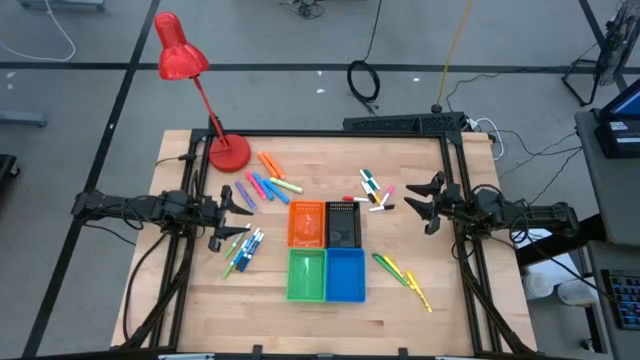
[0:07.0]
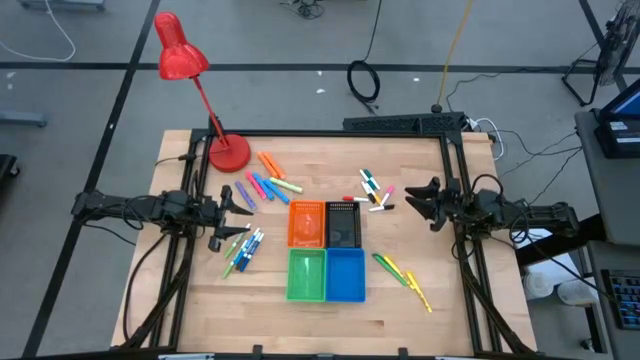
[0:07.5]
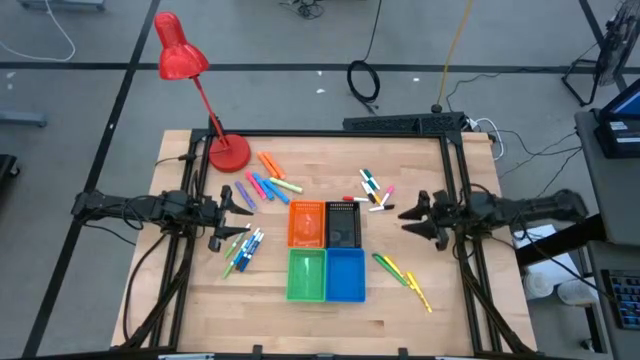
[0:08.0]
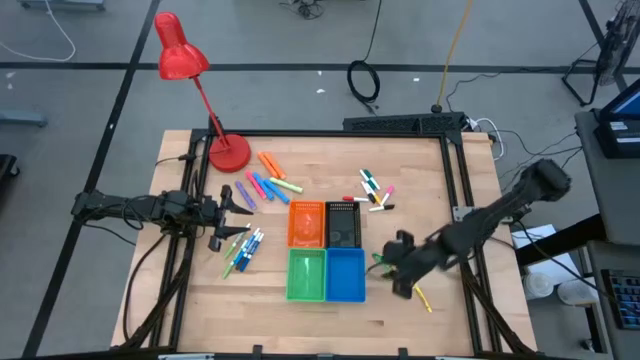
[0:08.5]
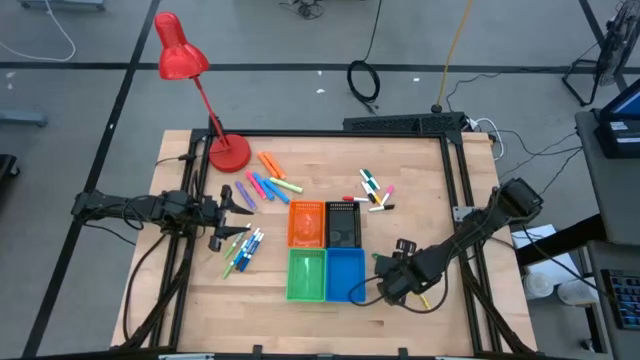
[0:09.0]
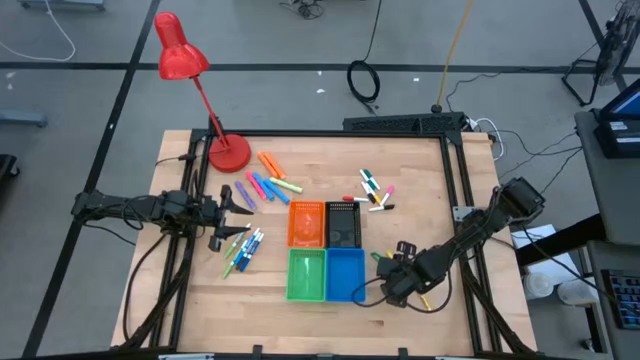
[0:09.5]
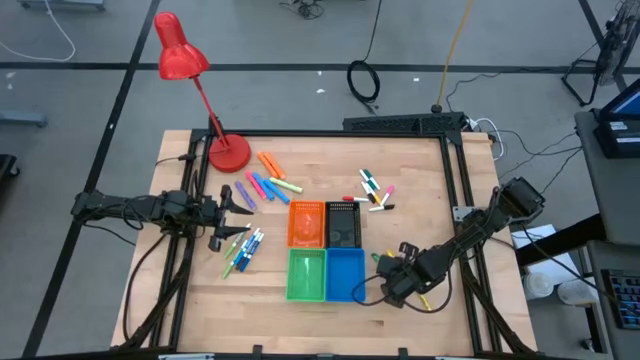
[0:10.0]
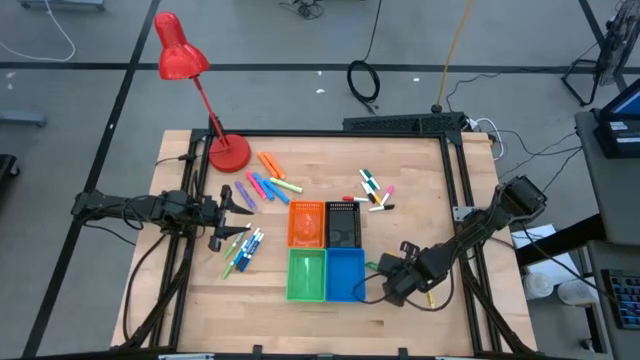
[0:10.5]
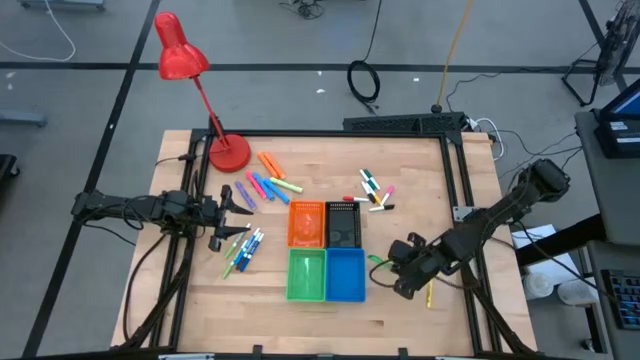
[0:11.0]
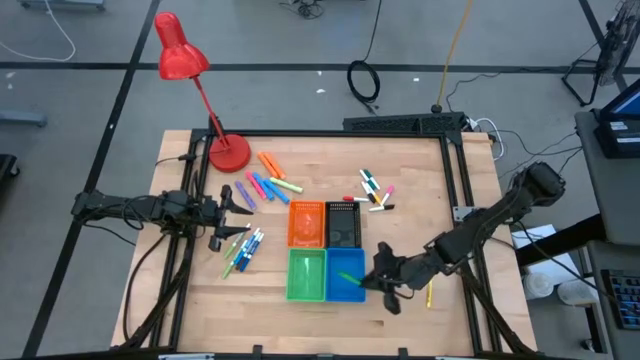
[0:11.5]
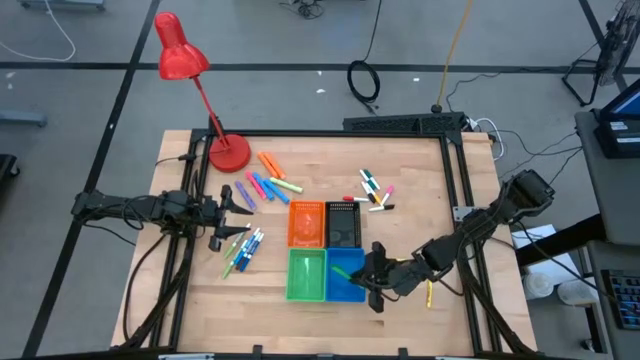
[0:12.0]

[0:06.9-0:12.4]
Task: Pick & Place Markers
Put the green pen into the blue basket

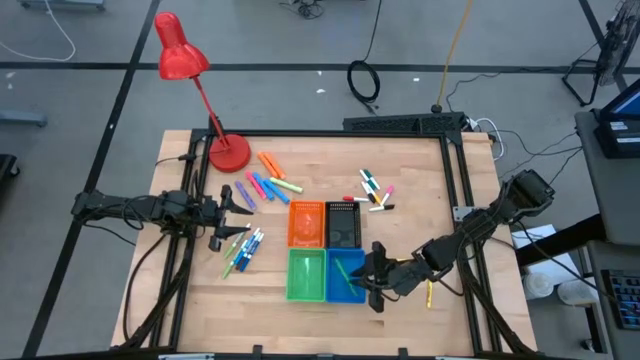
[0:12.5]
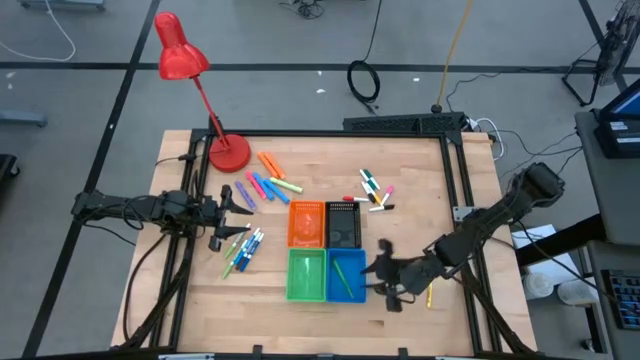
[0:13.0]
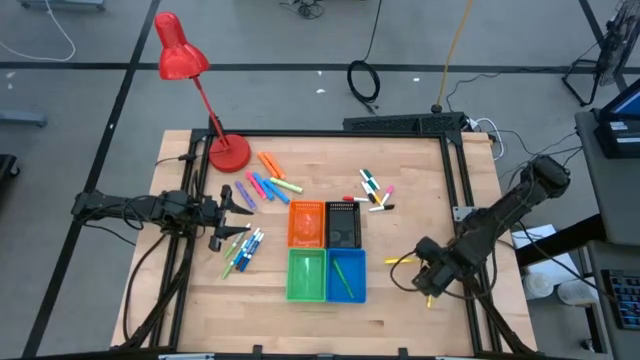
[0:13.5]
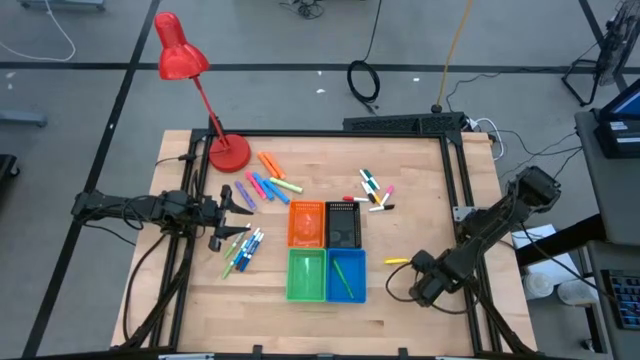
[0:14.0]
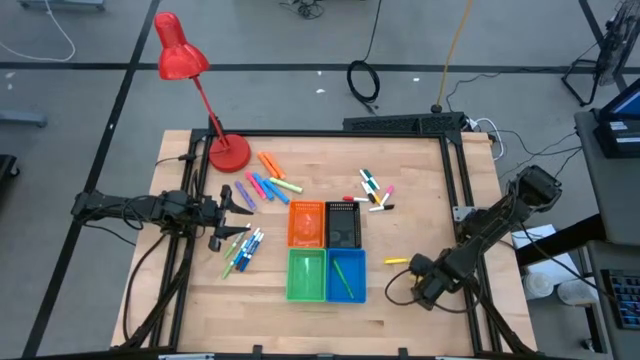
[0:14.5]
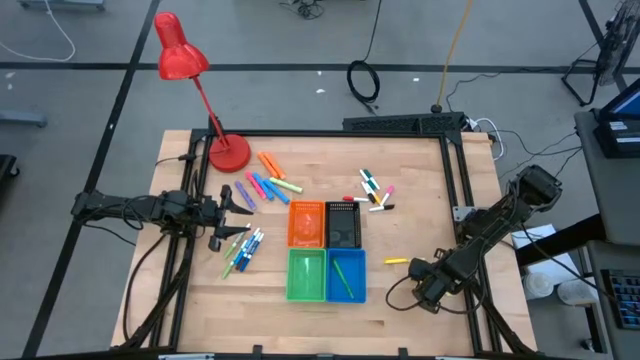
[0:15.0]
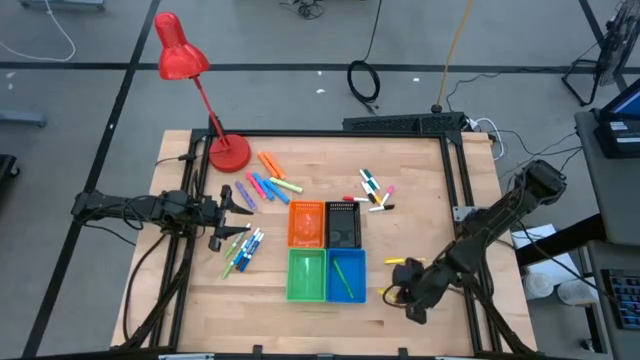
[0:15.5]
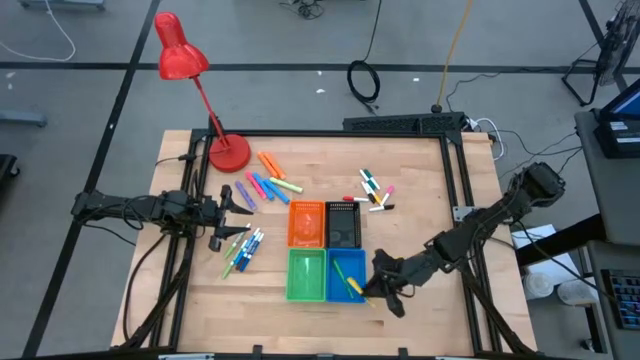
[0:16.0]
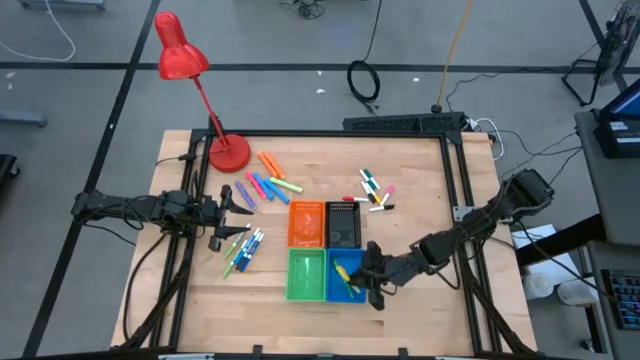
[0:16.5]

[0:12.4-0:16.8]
Put the bottom yellow pen into the blue basket

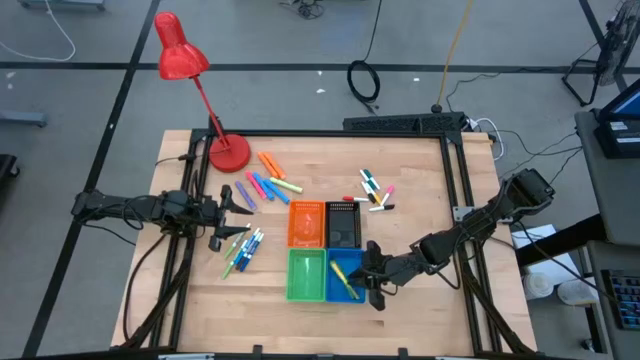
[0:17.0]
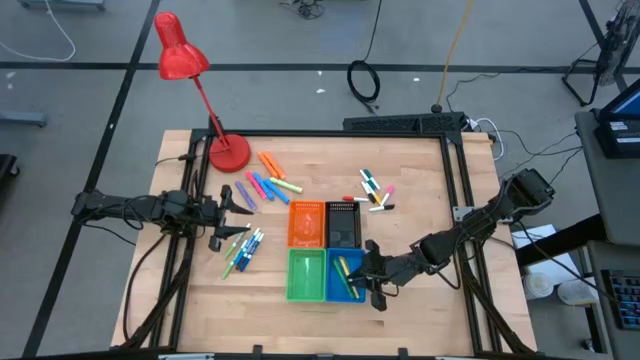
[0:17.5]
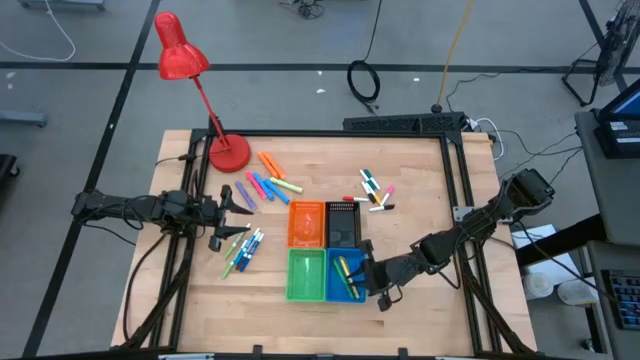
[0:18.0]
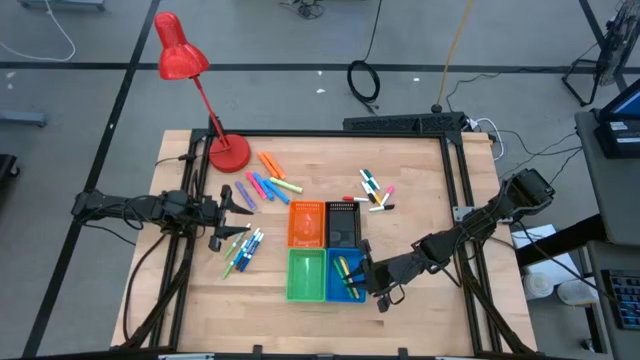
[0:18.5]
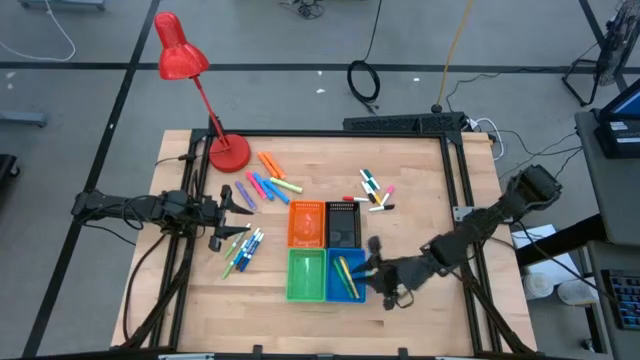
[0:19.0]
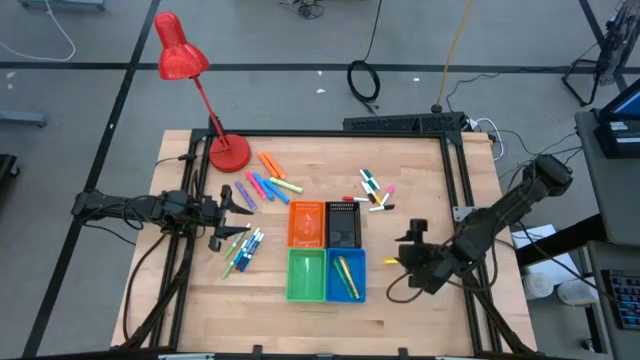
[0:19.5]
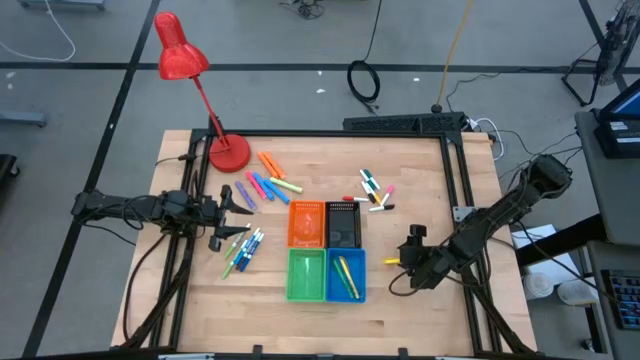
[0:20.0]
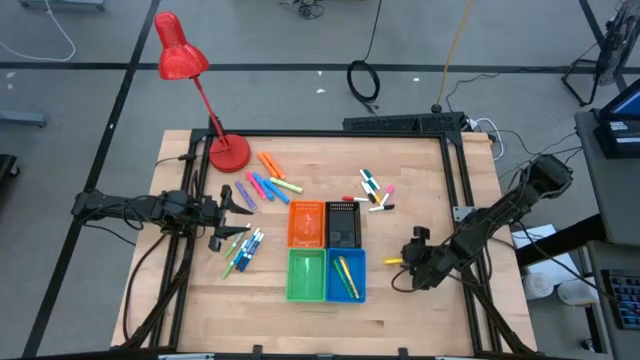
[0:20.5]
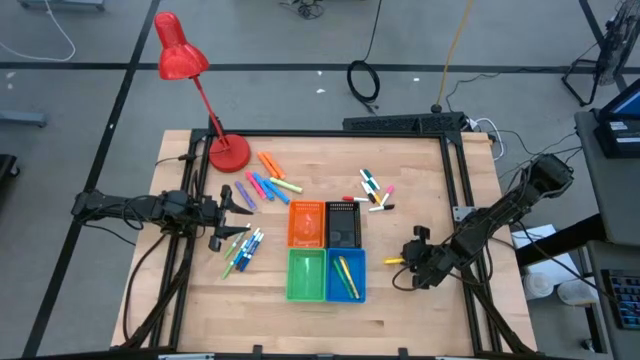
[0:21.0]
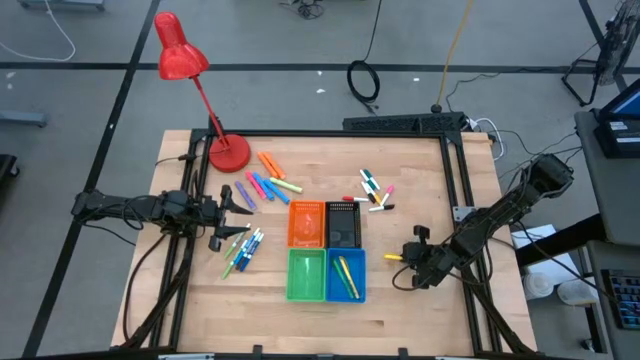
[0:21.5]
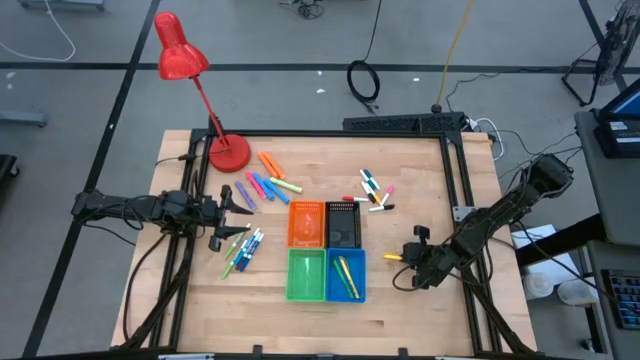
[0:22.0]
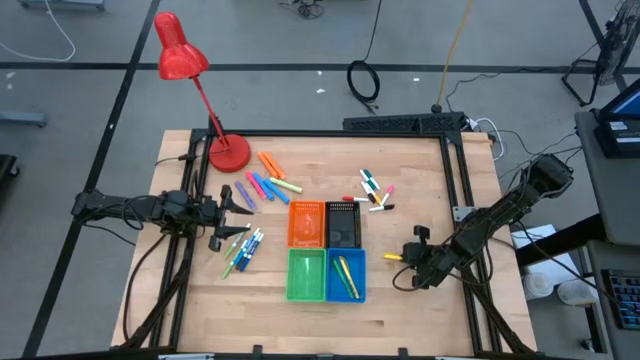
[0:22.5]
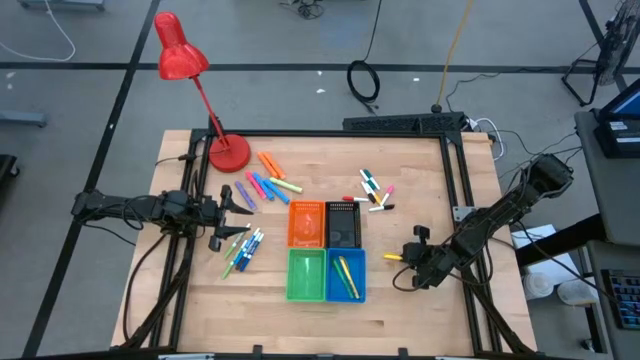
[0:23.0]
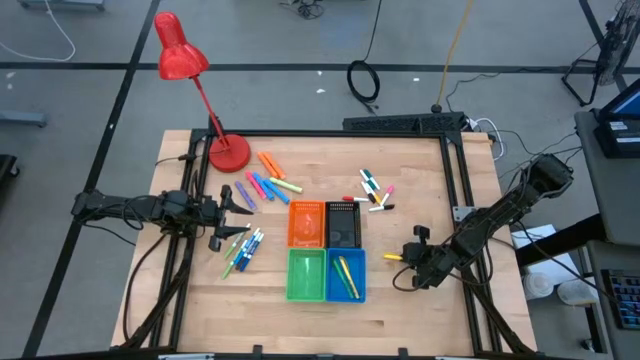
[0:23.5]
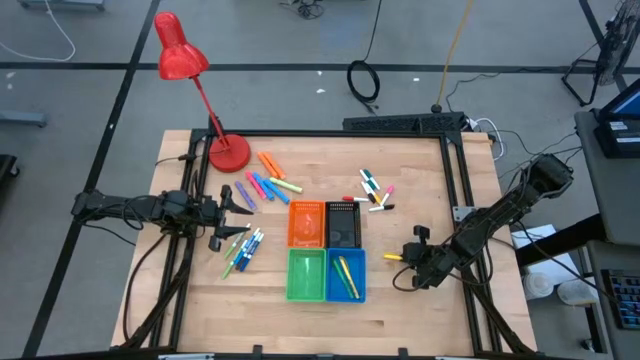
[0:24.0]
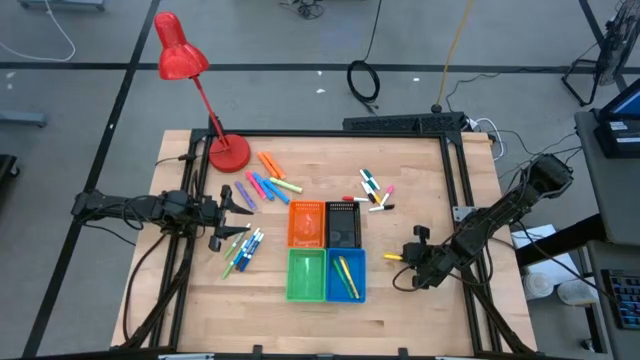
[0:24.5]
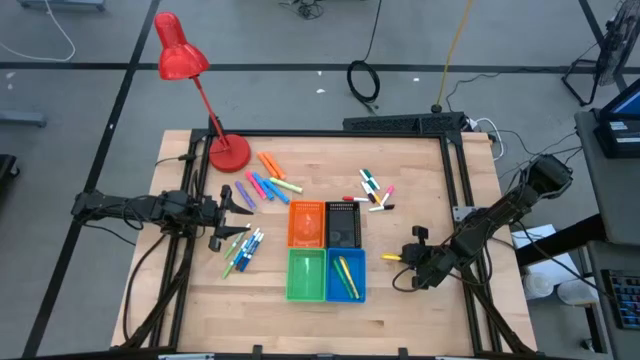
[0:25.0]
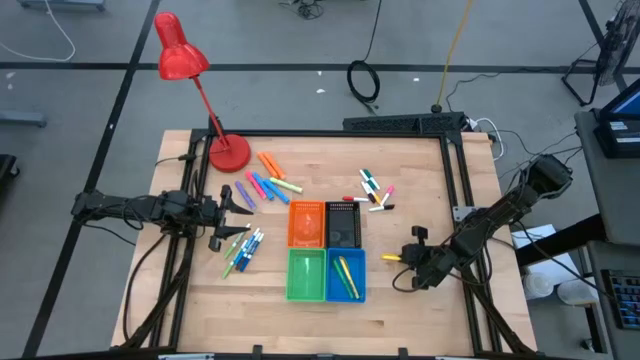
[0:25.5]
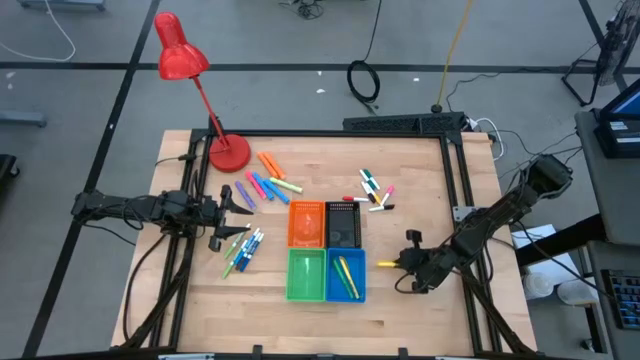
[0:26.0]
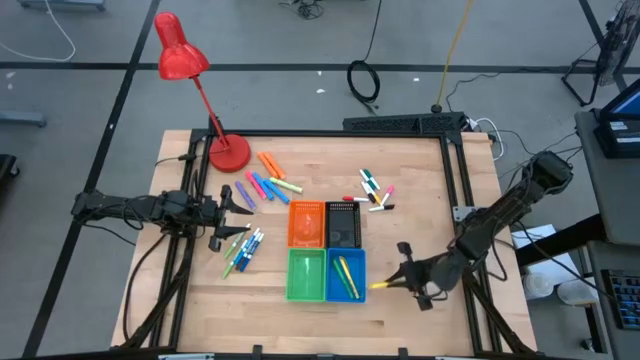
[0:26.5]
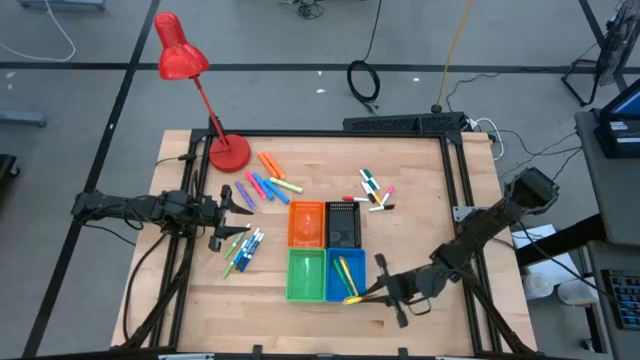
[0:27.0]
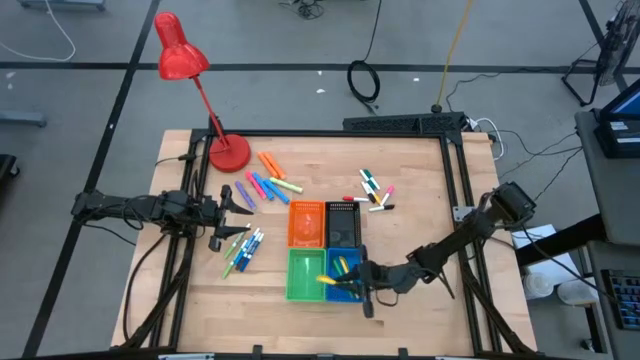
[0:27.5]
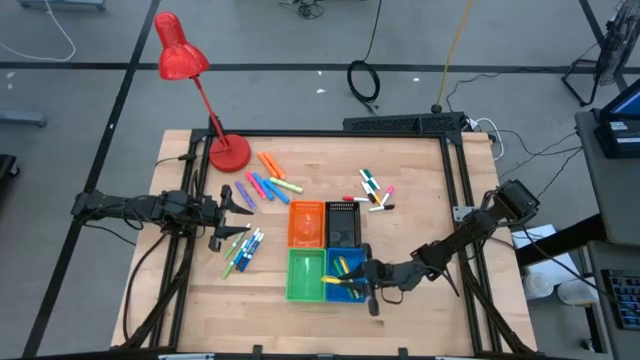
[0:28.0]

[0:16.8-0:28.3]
Put the yellow pen into the blue basket
